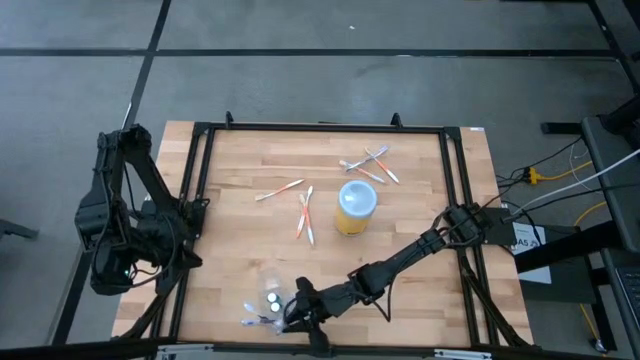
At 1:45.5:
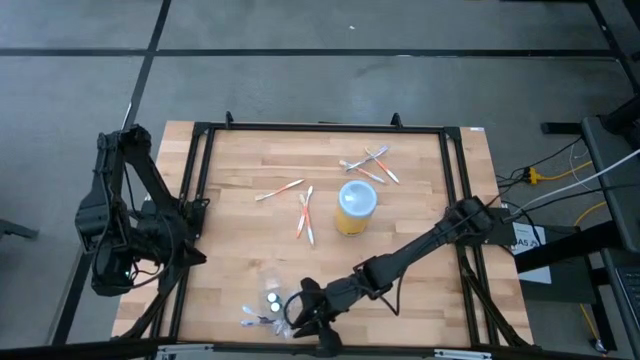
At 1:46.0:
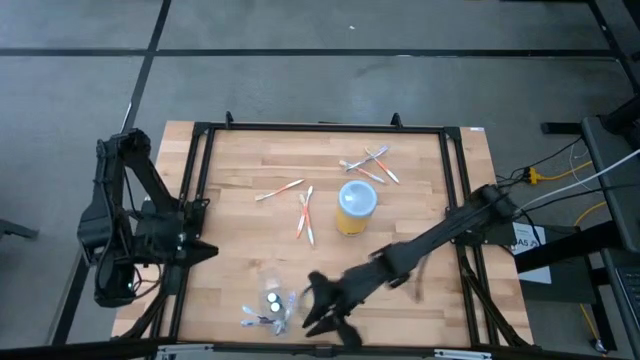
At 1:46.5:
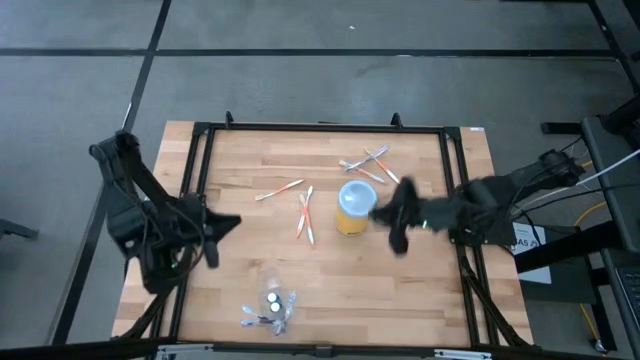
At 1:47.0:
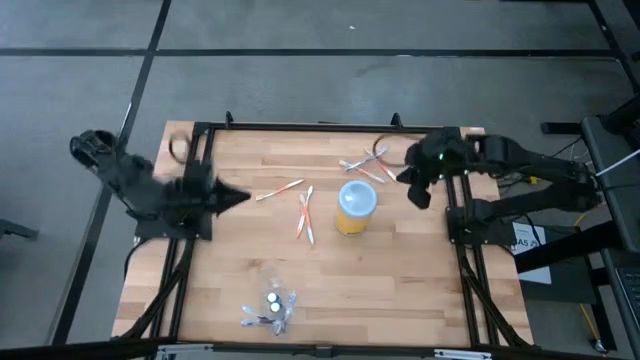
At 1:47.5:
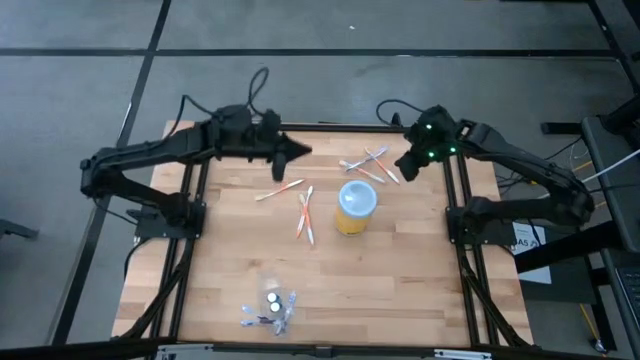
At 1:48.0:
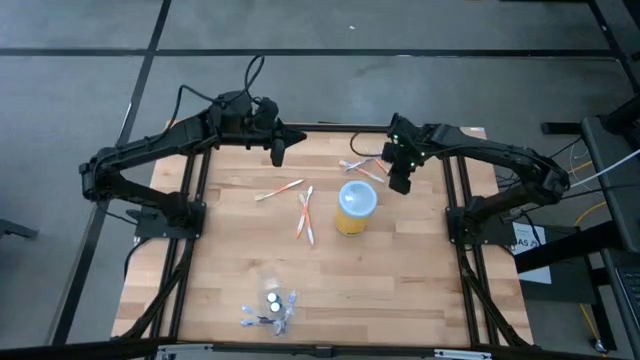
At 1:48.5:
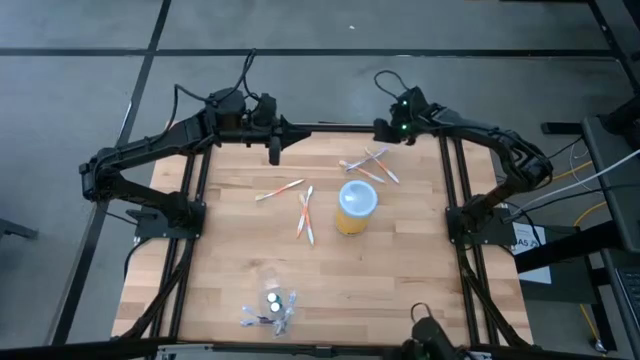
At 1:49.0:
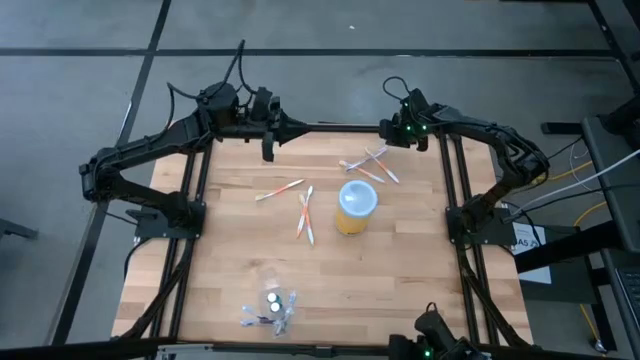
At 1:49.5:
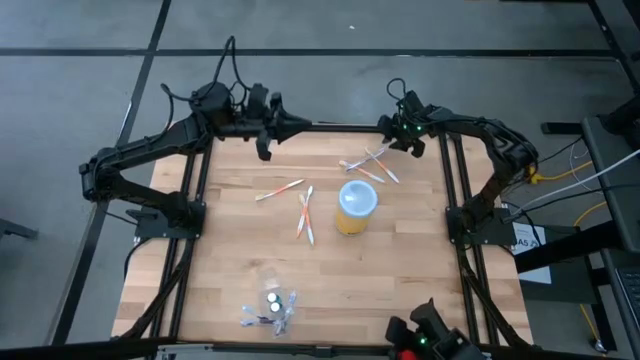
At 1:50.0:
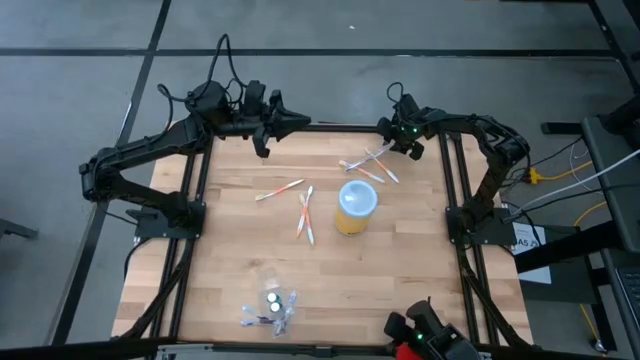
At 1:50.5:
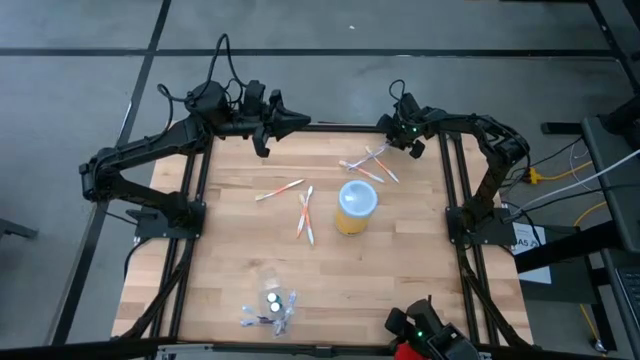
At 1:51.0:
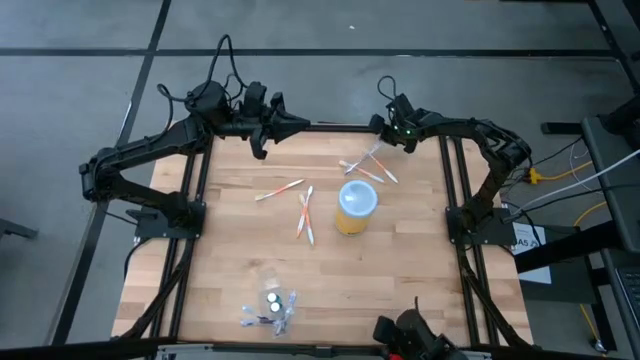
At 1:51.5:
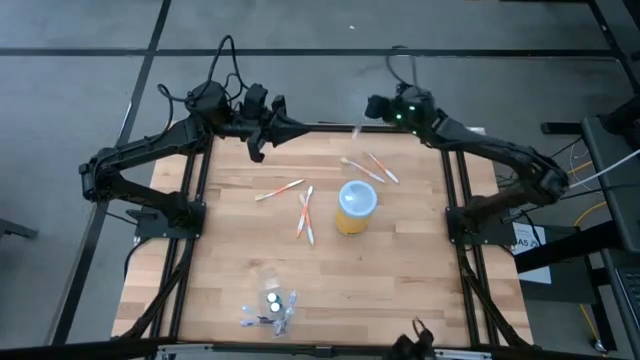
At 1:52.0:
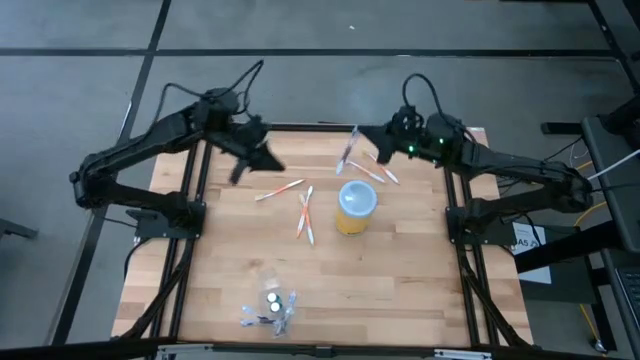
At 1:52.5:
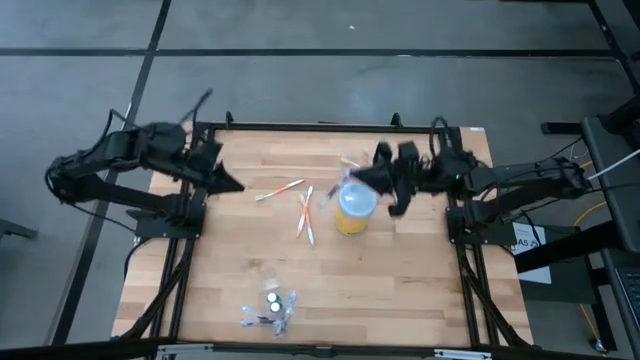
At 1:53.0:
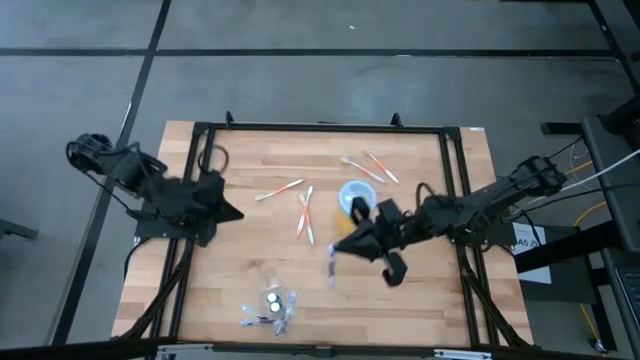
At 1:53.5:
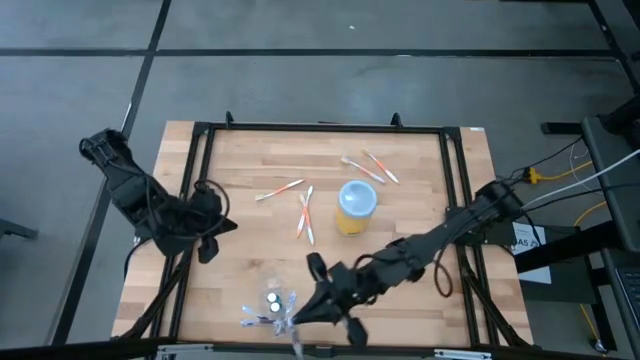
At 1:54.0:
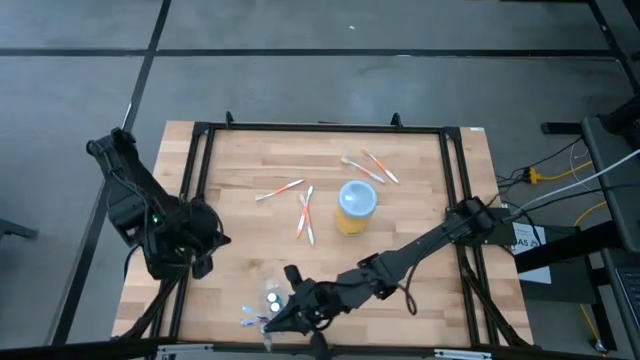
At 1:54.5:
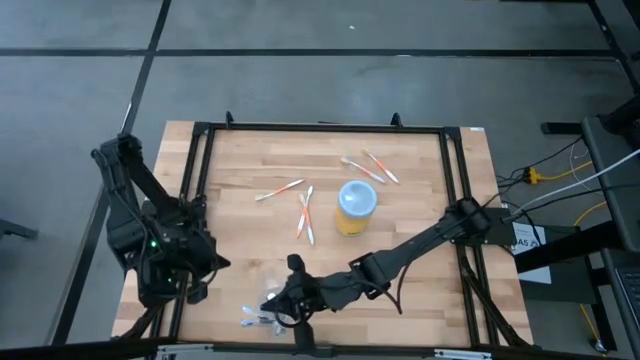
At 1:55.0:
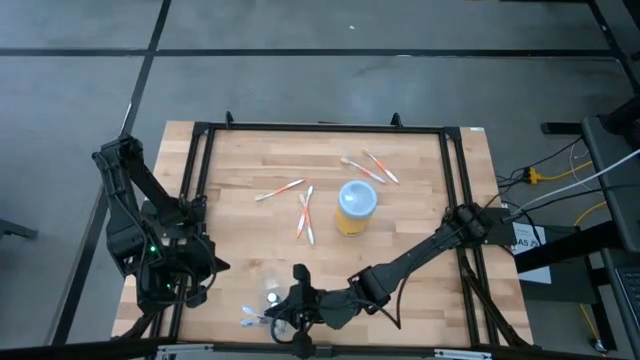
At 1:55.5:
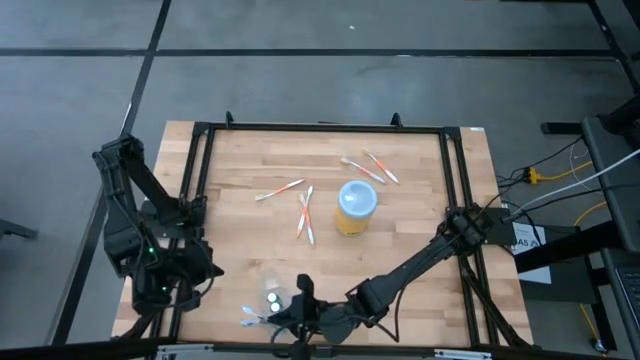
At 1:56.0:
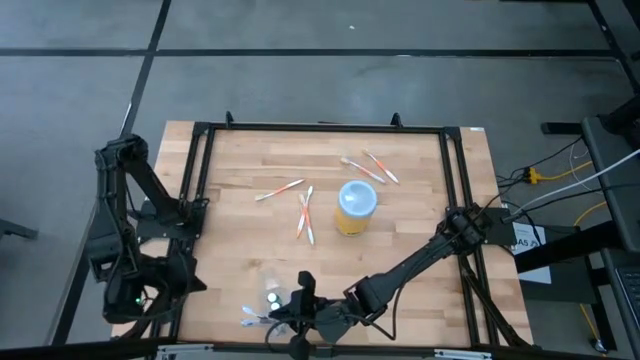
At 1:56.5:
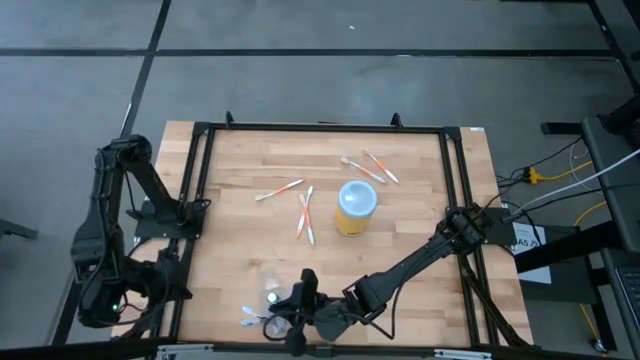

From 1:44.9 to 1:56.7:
Task: Pick & Place toothbrushing station
Put the violet toothbrush into the right side of the transparent organizer

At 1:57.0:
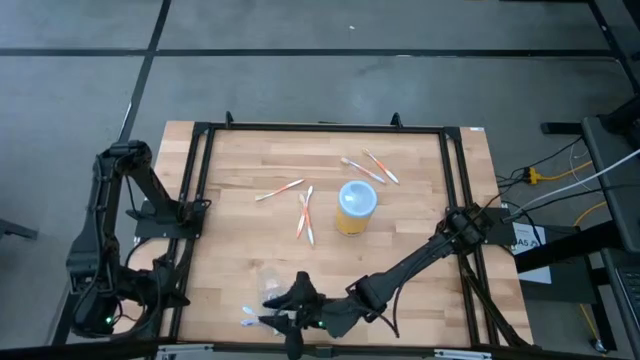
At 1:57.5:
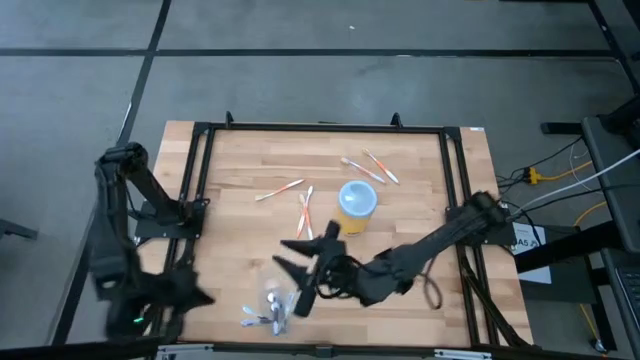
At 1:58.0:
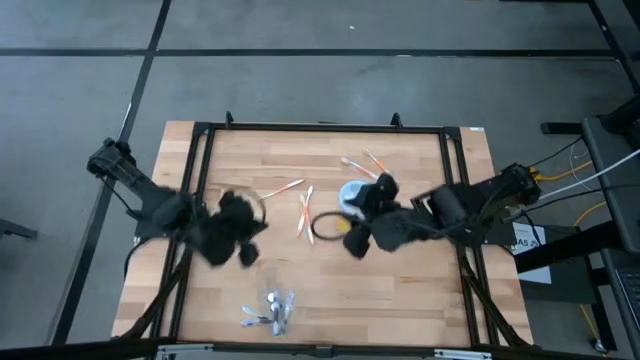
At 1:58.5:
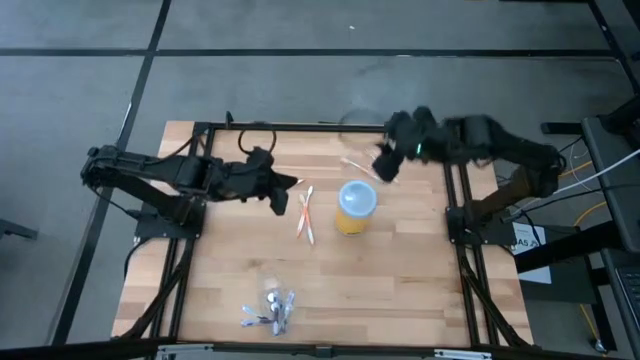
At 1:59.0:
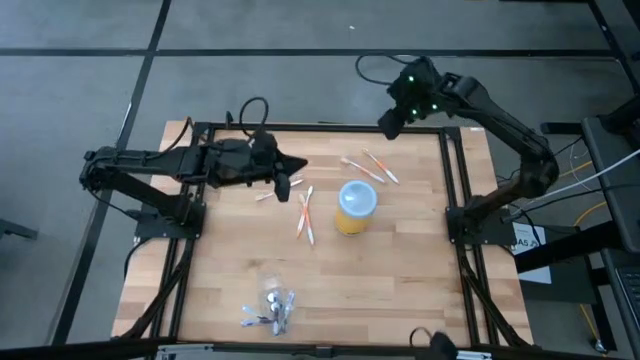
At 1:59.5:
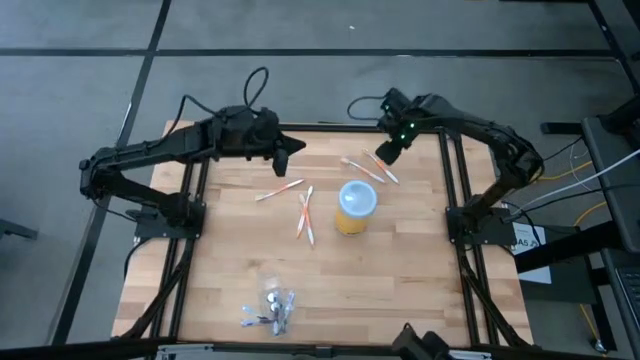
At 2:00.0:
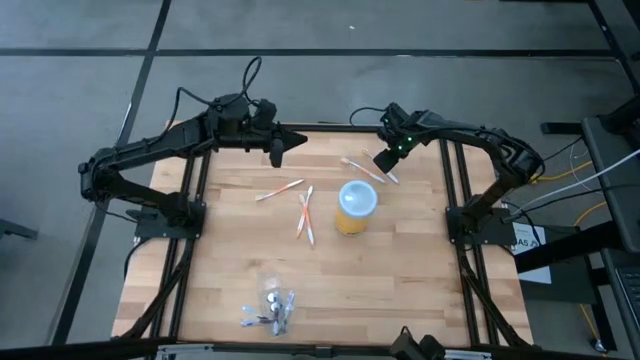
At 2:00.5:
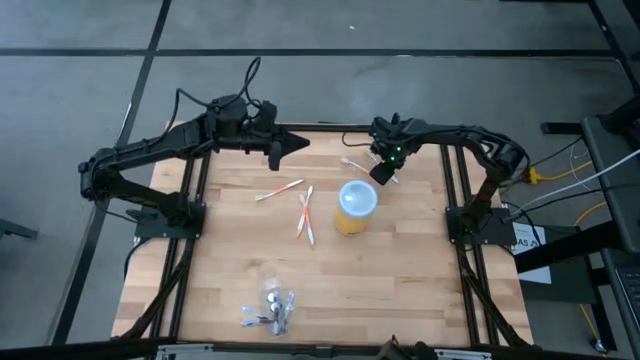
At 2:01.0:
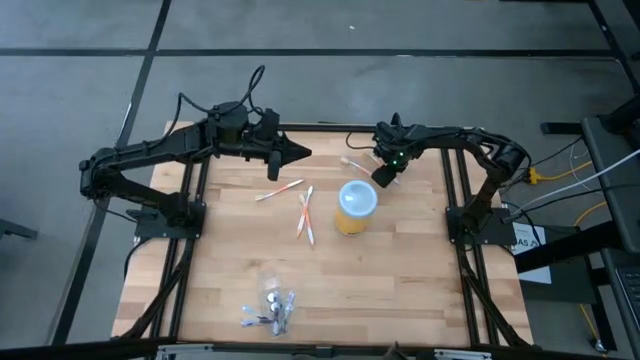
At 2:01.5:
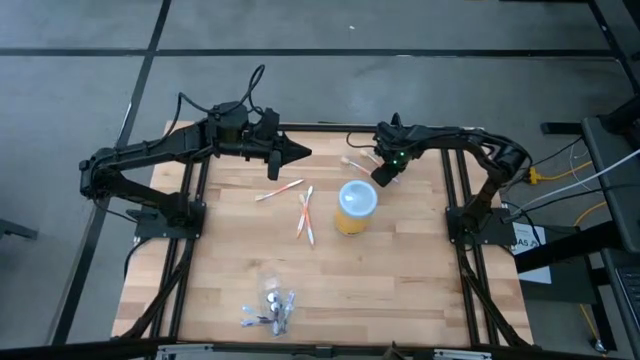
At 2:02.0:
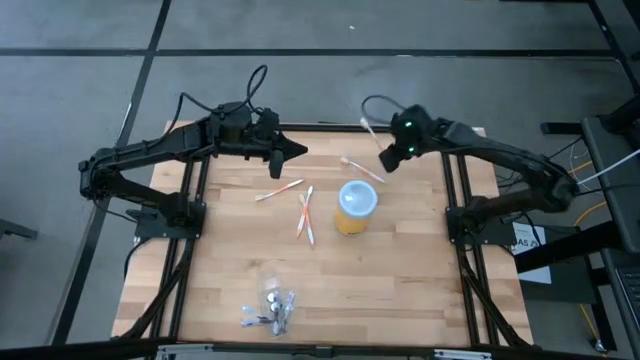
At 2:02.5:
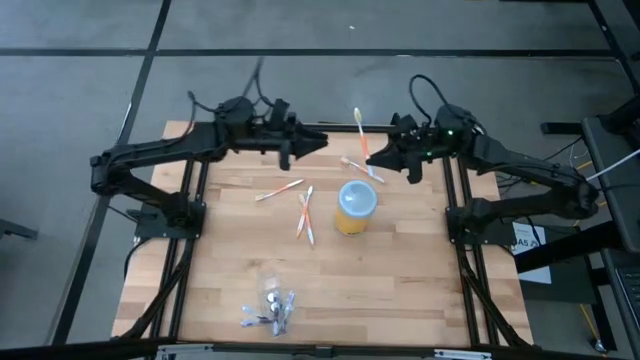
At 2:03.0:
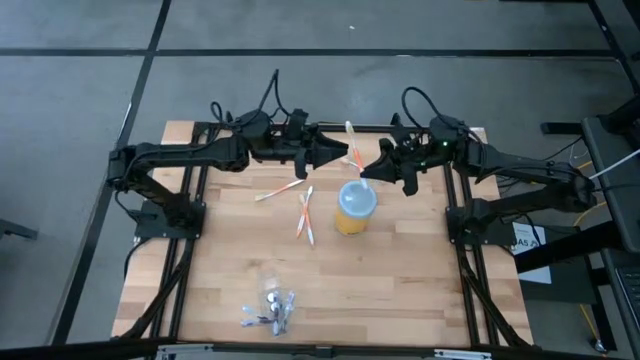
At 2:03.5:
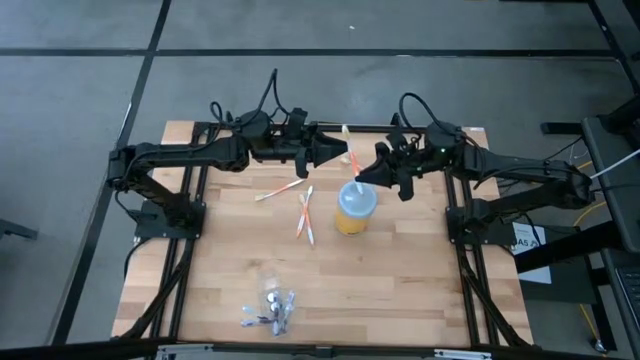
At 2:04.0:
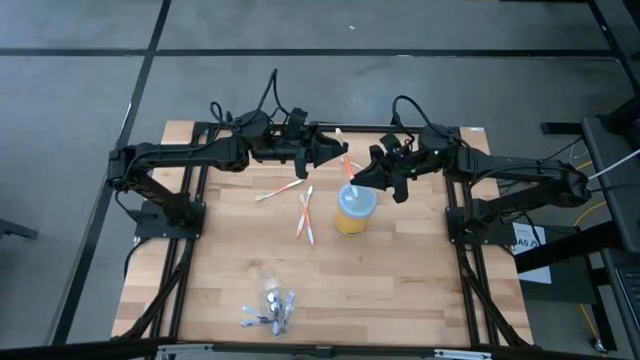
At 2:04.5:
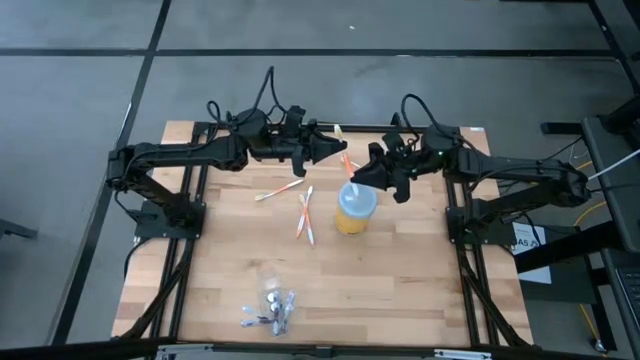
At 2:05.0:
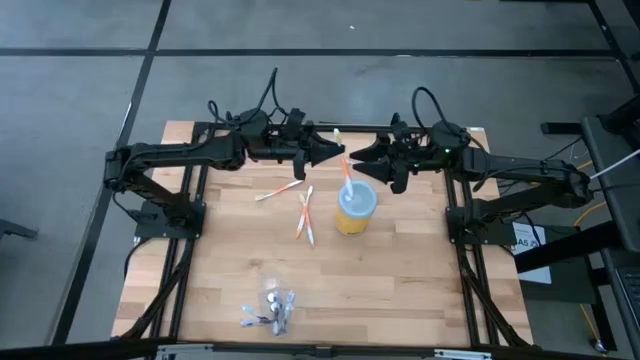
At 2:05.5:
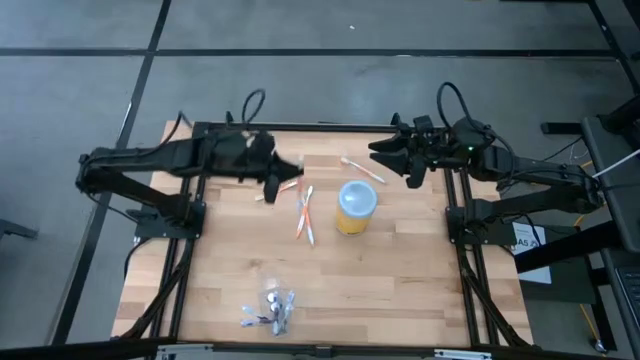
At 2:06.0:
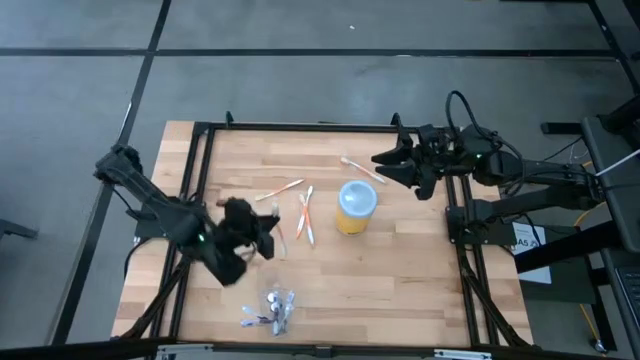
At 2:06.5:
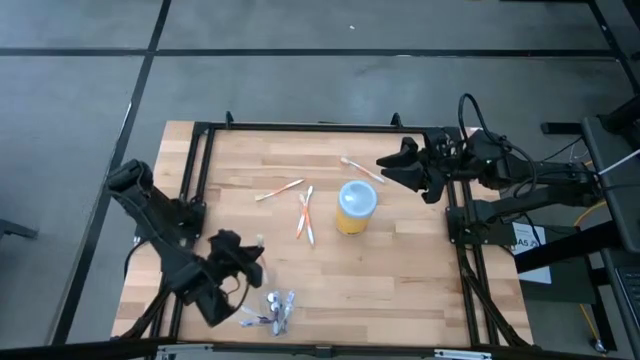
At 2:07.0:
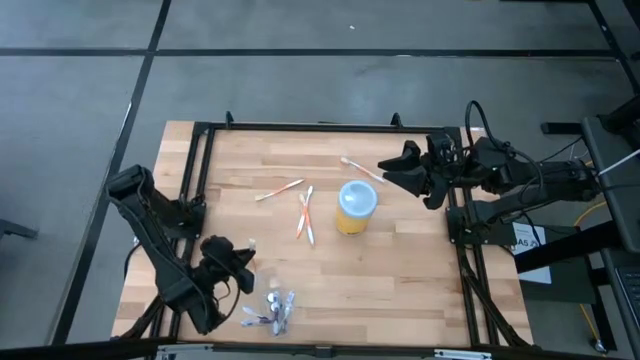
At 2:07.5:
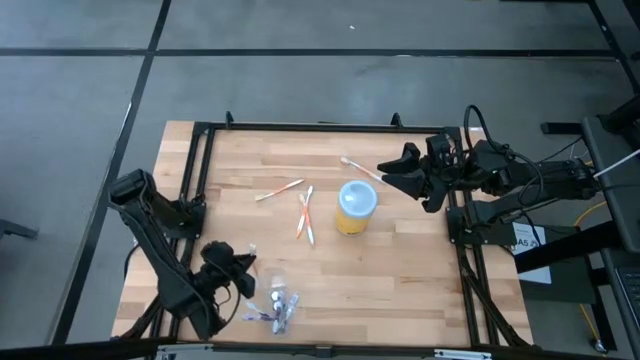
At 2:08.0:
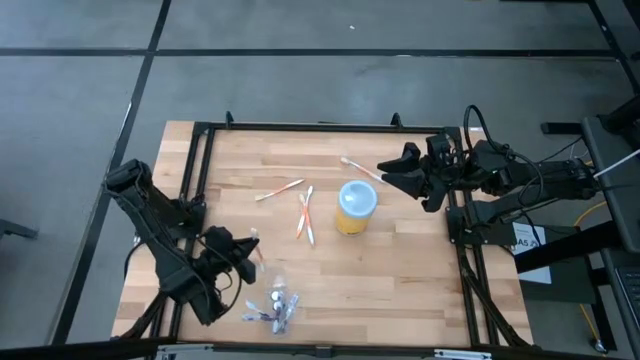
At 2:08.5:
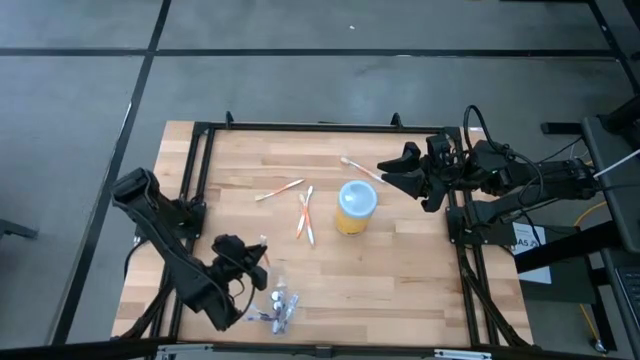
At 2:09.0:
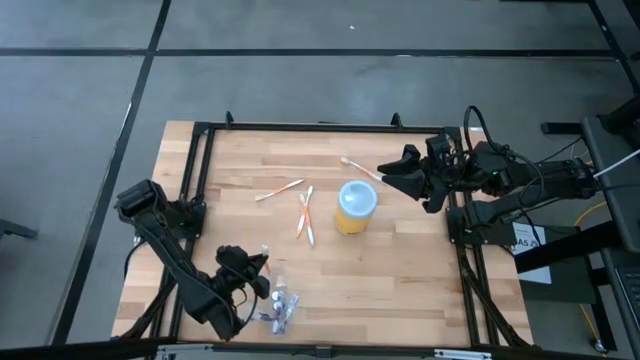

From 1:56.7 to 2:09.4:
Put the orange toothbrush into the left side of the transparent organizer
